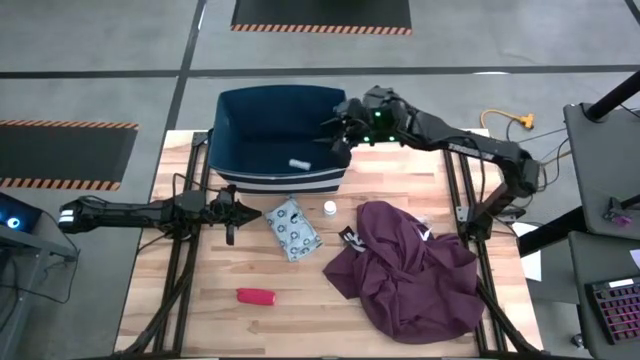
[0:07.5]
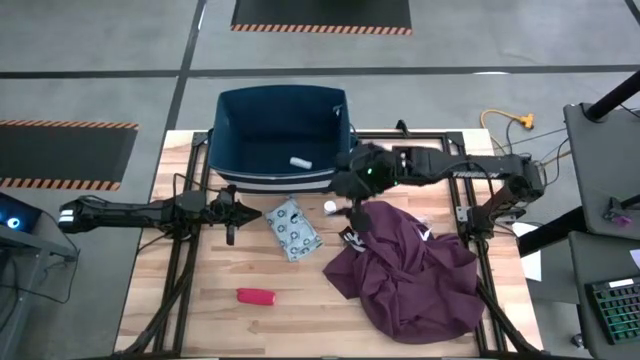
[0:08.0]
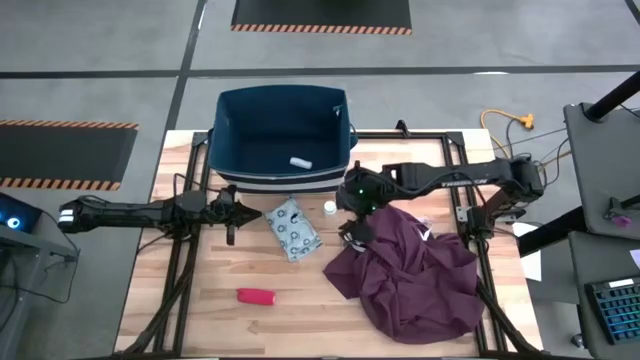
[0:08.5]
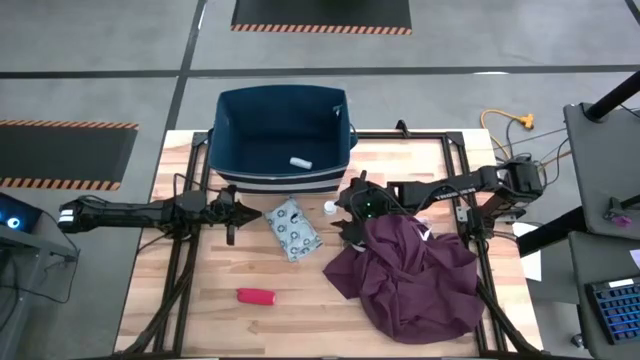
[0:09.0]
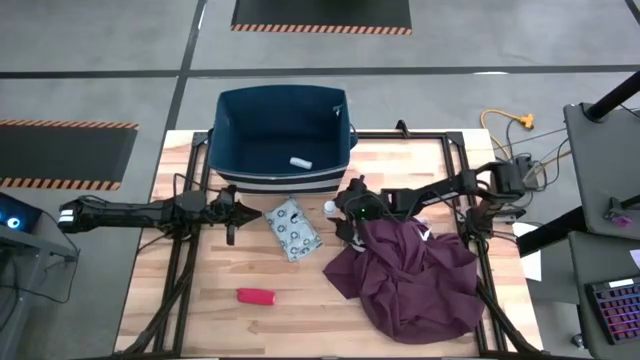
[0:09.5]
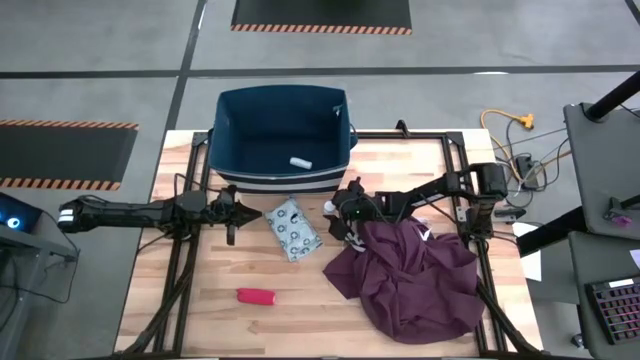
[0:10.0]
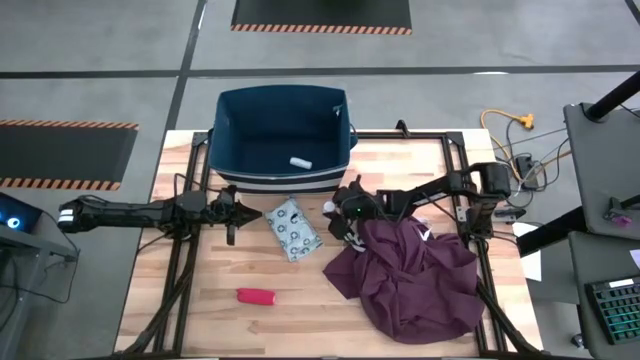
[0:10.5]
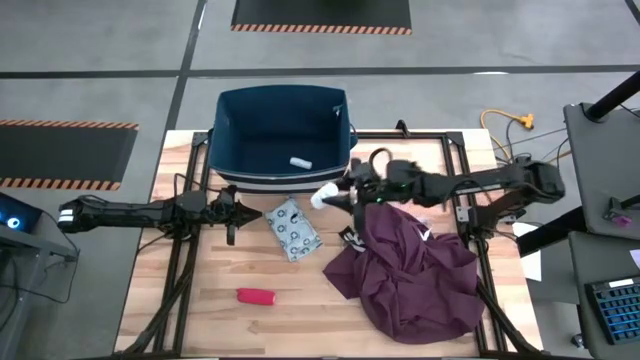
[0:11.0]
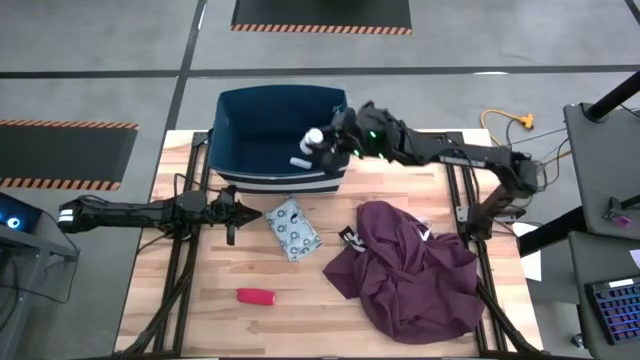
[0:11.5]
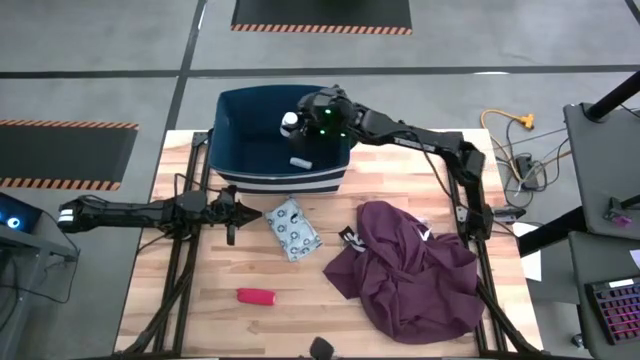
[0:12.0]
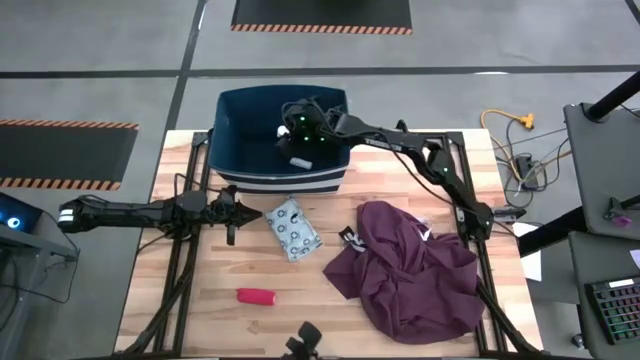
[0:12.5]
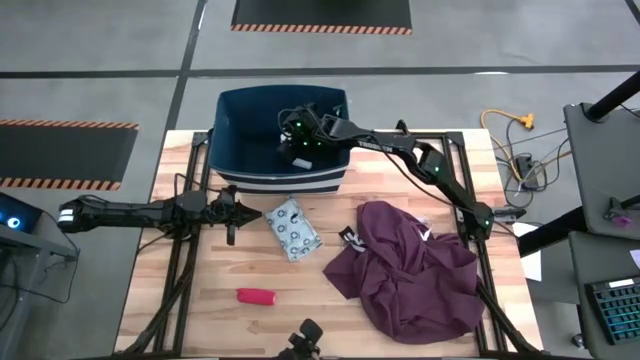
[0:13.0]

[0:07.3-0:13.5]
Task: Pick & place medical supplies in basket/bin
Put the pill bottle into the bin

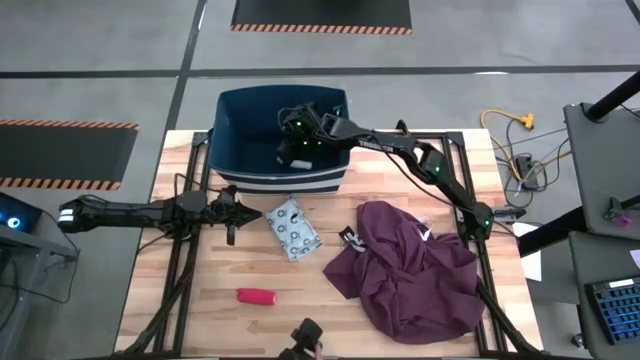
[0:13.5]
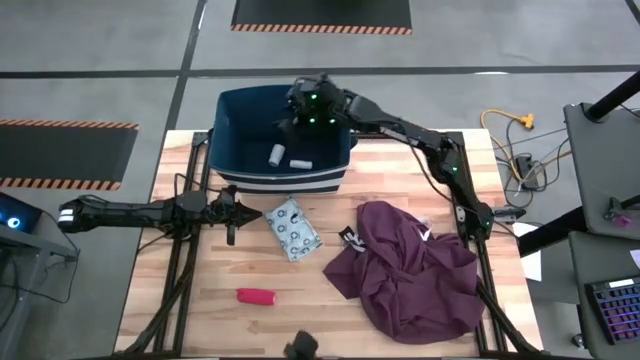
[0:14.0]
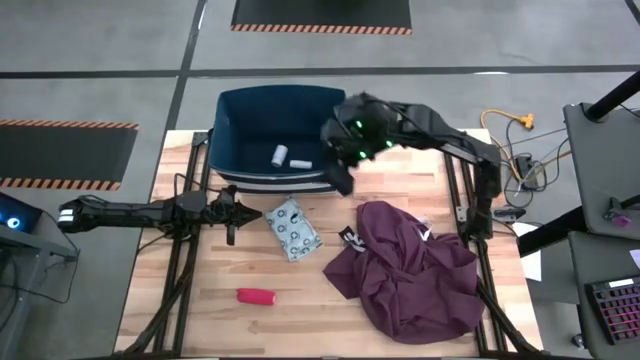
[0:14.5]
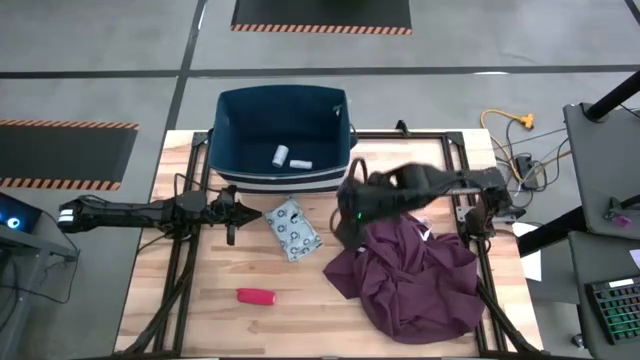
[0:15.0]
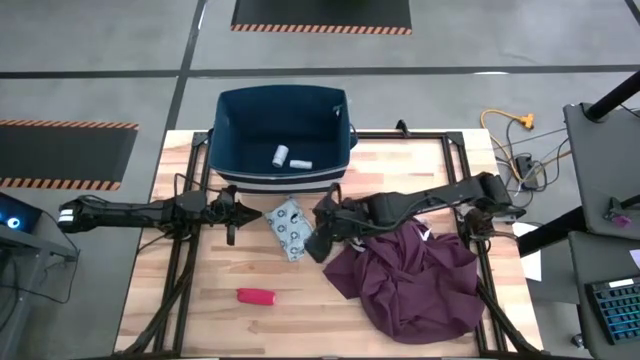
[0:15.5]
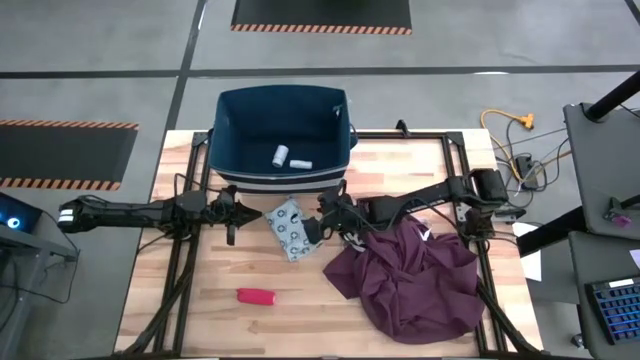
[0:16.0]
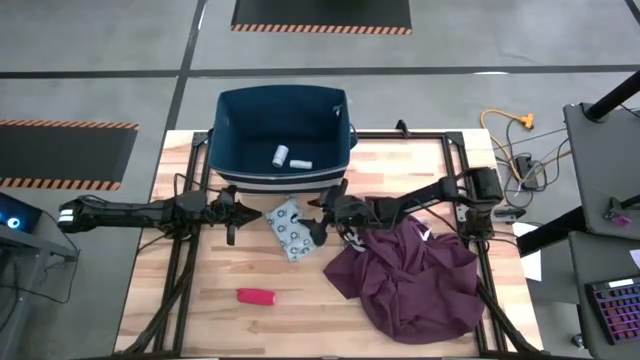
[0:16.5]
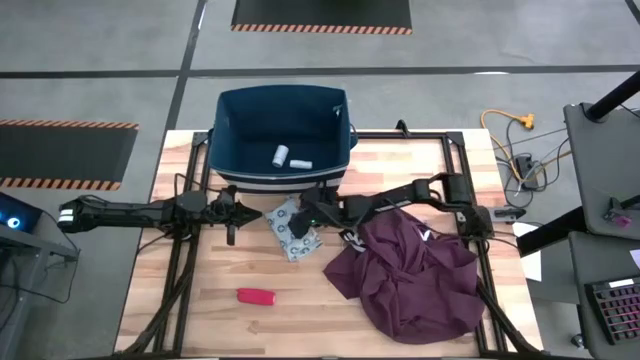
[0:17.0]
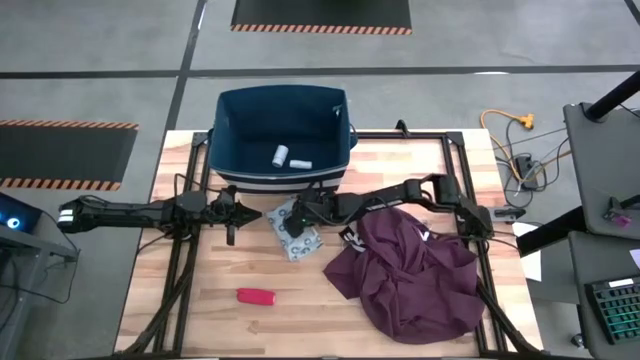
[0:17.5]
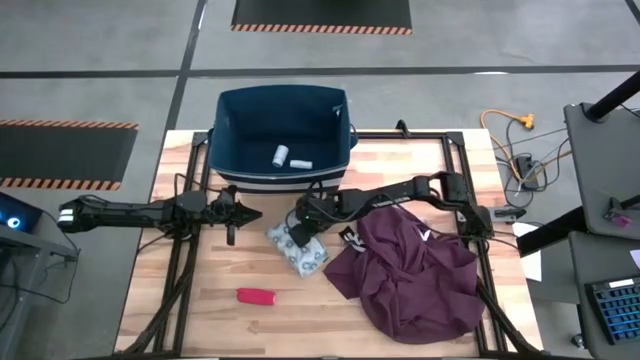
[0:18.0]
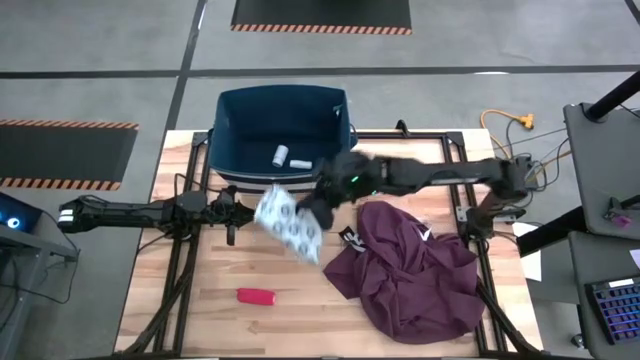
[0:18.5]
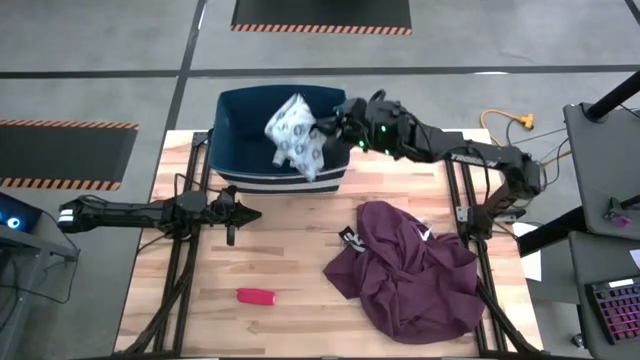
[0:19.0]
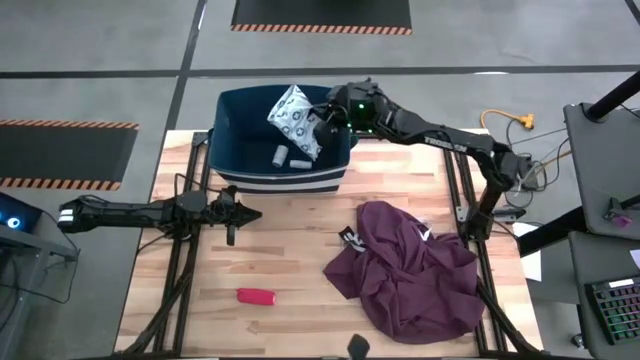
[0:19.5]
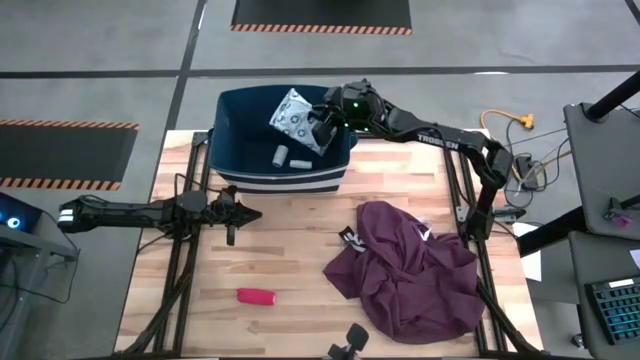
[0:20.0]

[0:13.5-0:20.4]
Put the mailer bag into the bin

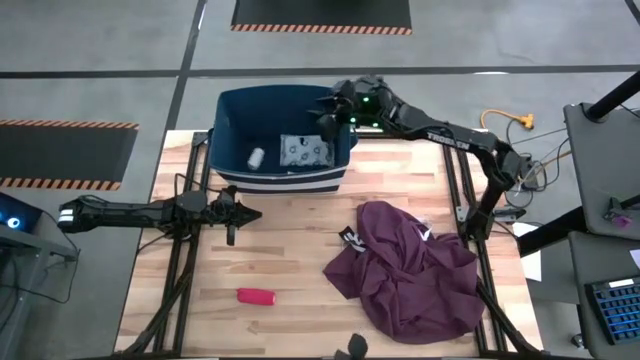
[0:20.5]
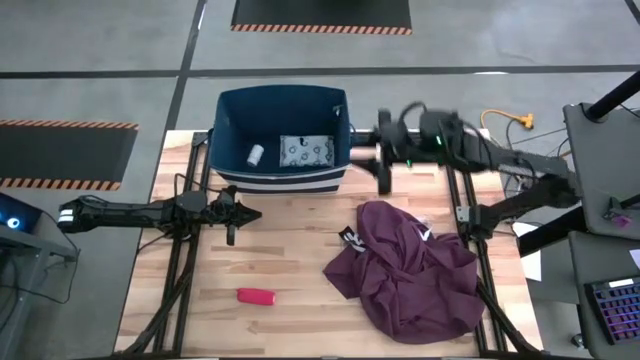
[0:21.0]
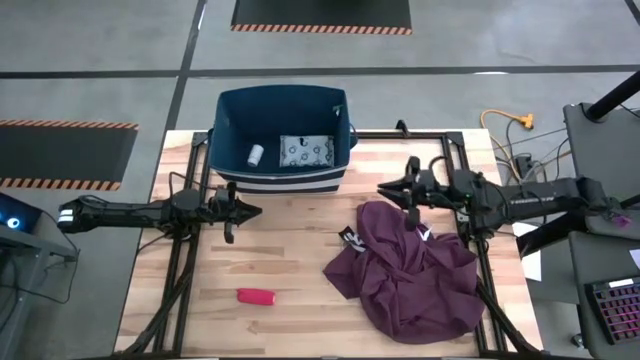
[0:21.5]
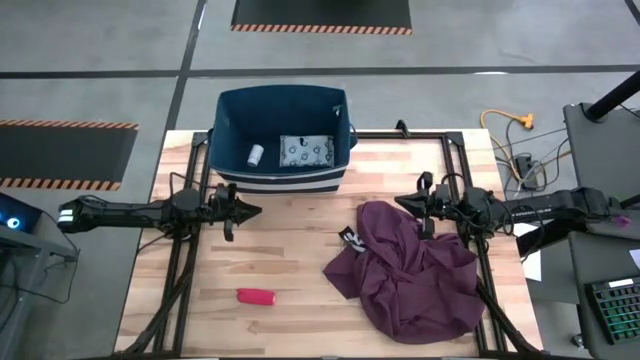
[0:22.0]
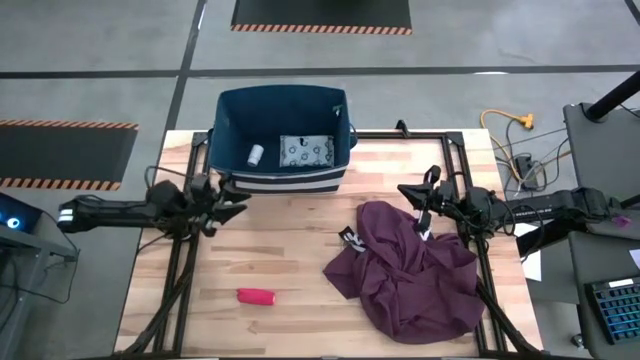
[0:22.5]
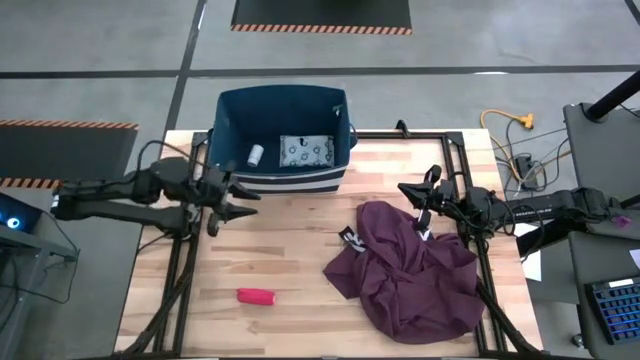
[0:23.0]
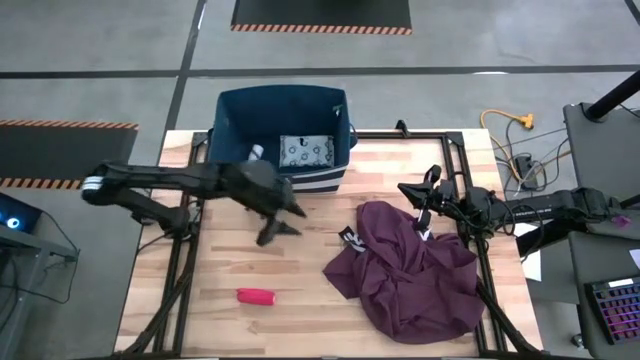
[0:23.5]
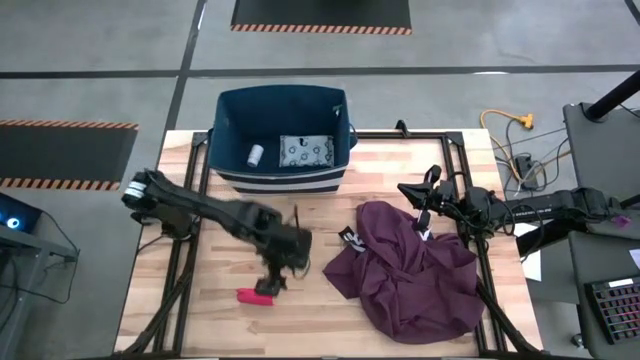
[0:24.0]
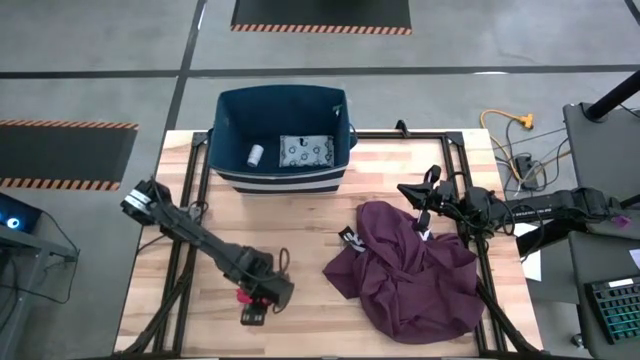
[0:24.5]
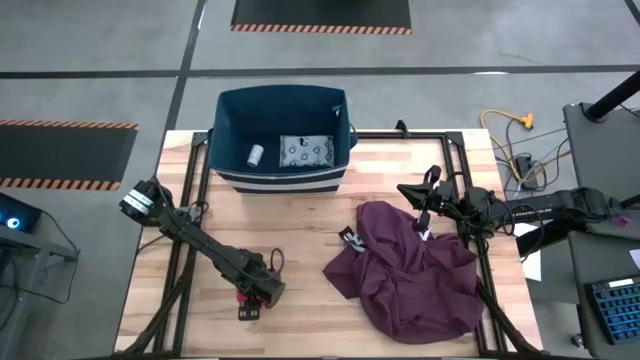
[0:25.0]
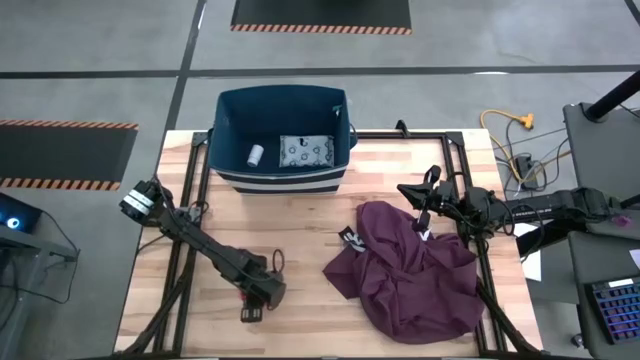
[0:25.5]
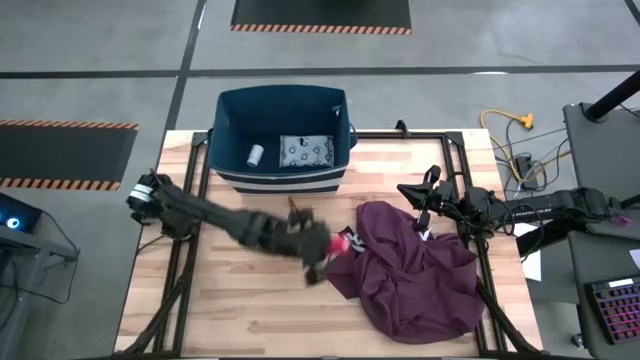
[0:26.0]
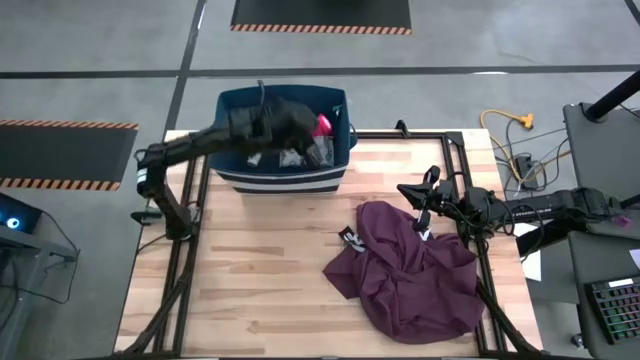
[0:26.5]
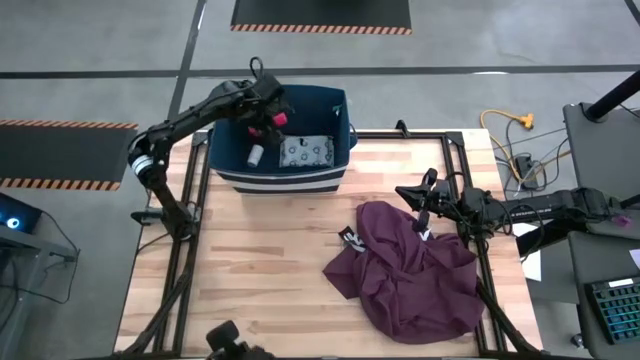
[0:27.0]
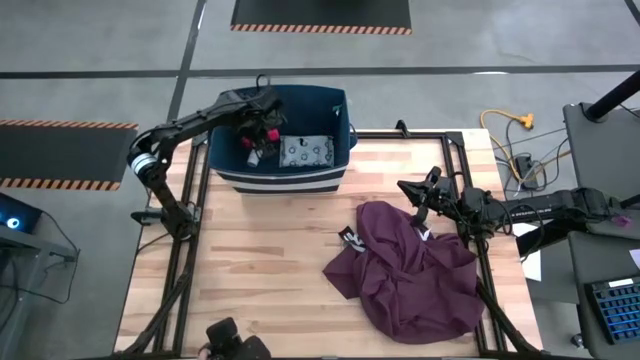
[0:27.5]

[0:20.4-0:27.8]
Put the bandage into the bin
